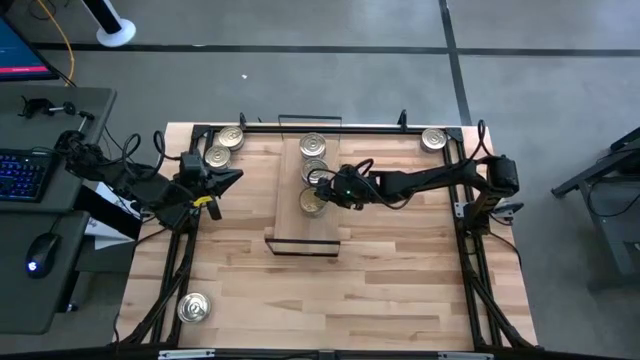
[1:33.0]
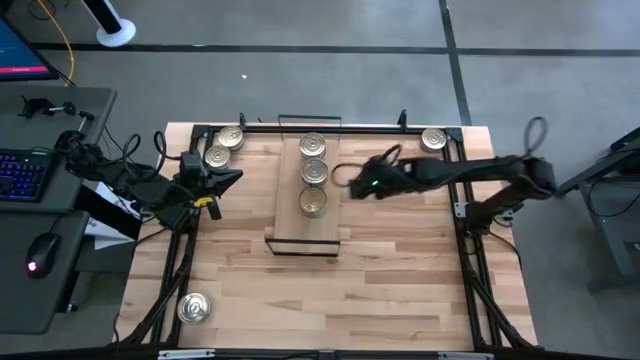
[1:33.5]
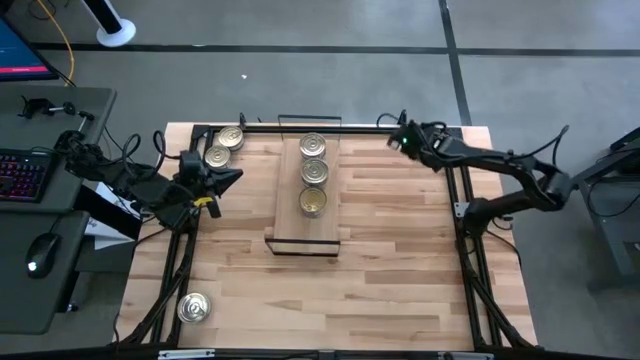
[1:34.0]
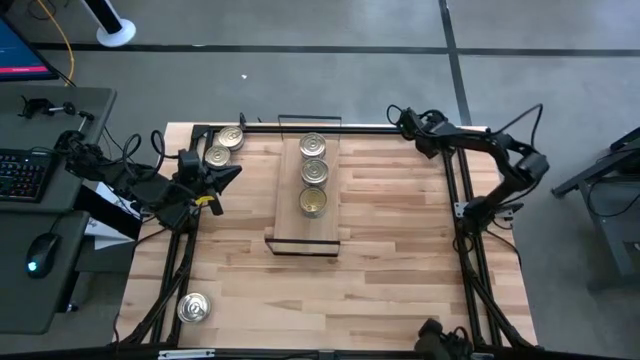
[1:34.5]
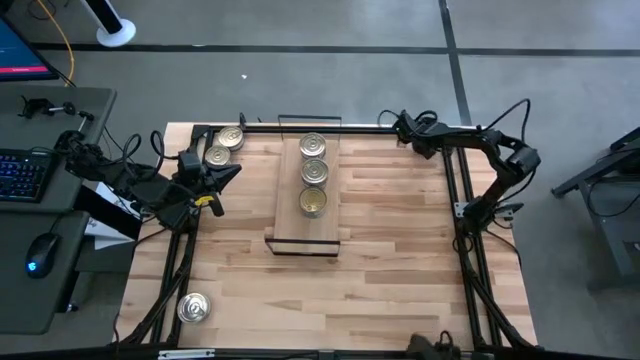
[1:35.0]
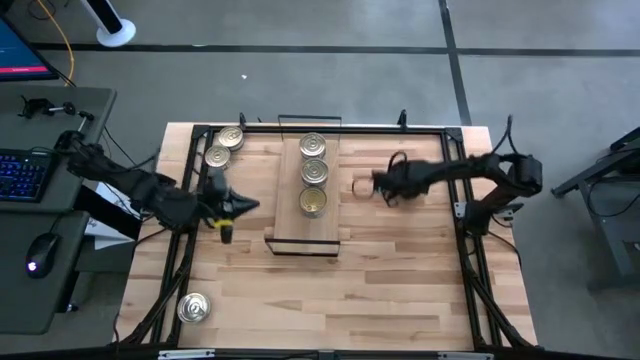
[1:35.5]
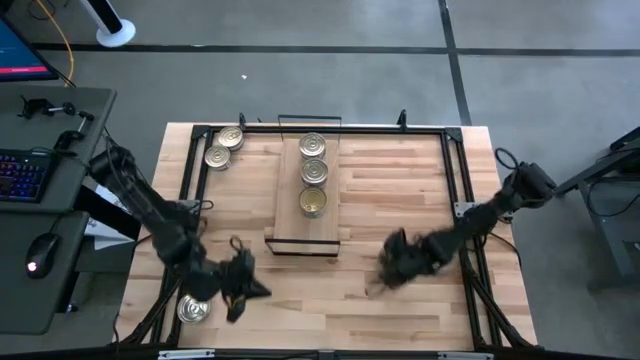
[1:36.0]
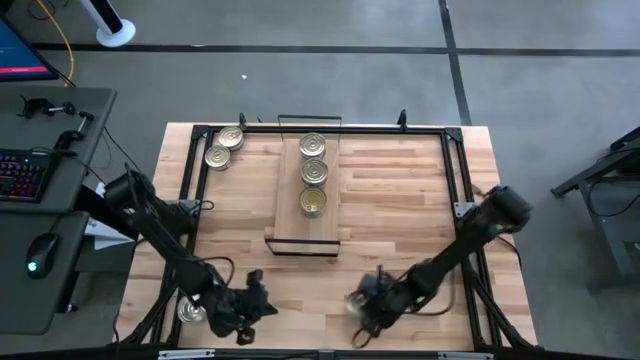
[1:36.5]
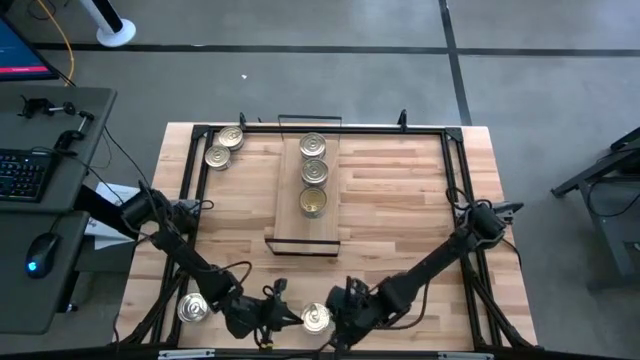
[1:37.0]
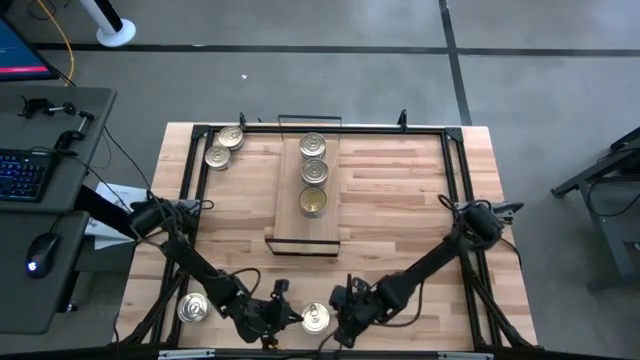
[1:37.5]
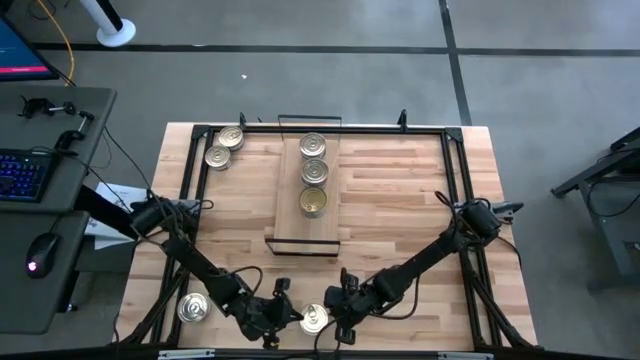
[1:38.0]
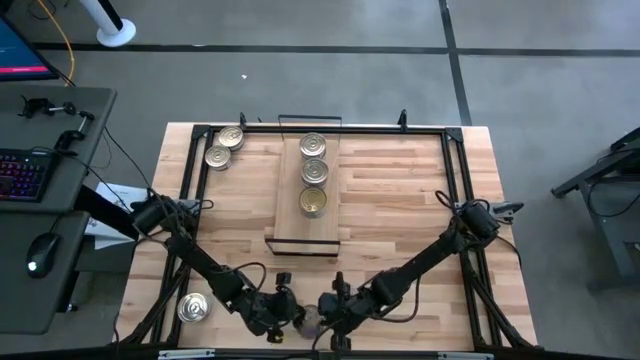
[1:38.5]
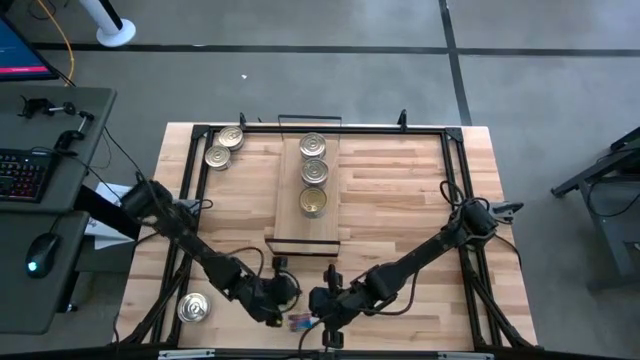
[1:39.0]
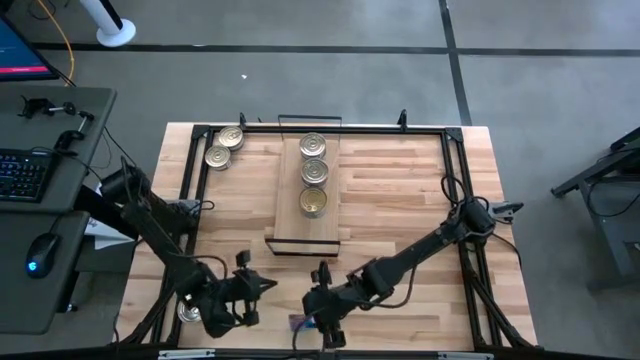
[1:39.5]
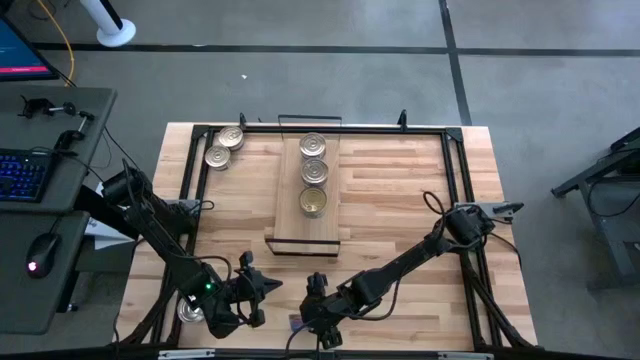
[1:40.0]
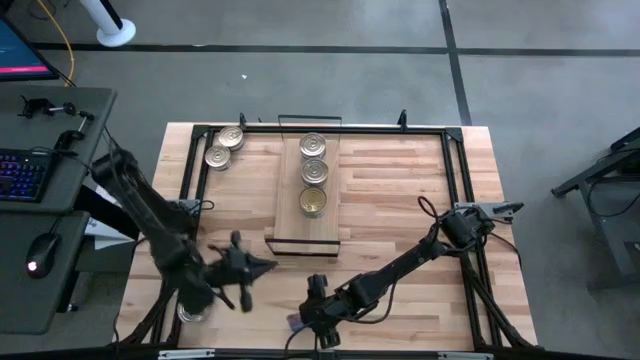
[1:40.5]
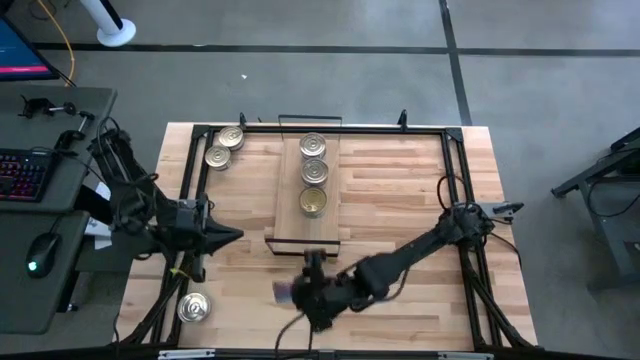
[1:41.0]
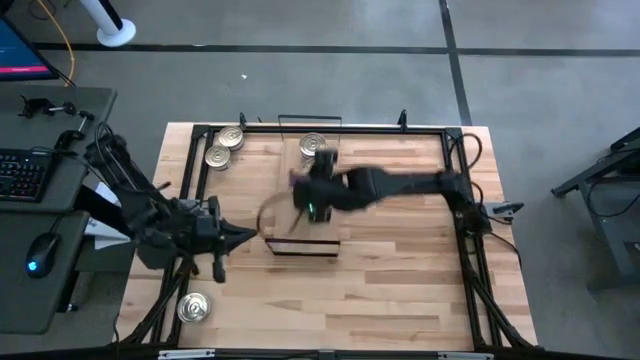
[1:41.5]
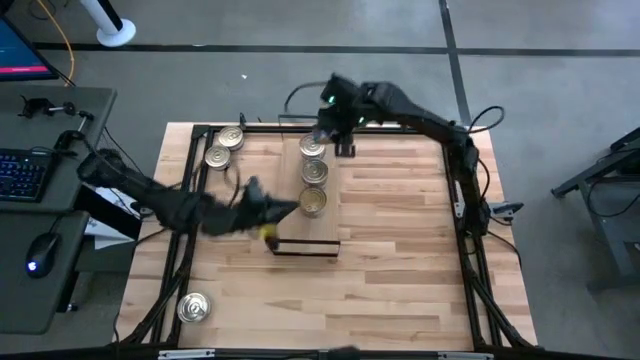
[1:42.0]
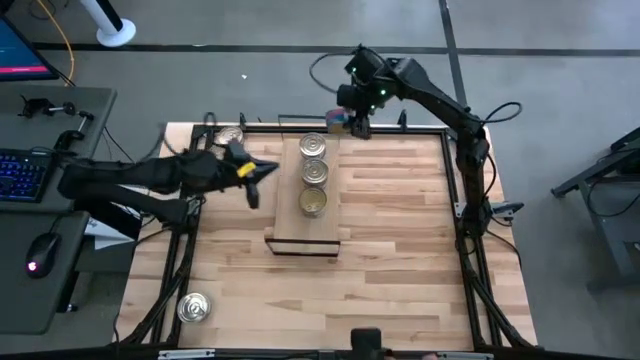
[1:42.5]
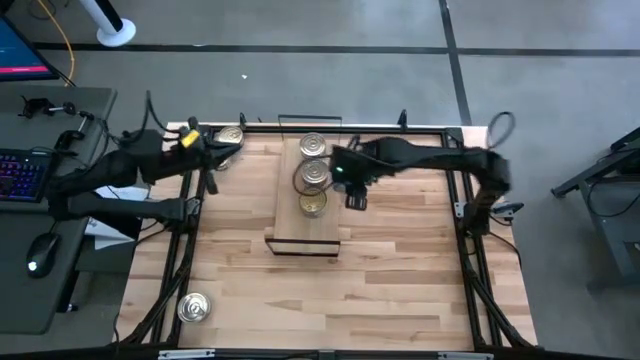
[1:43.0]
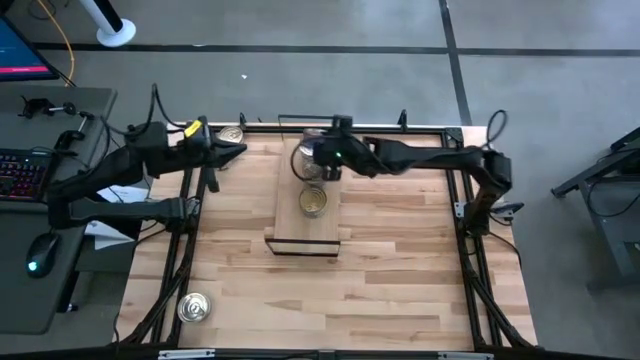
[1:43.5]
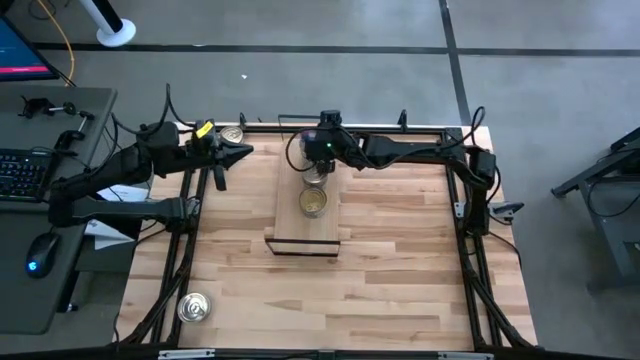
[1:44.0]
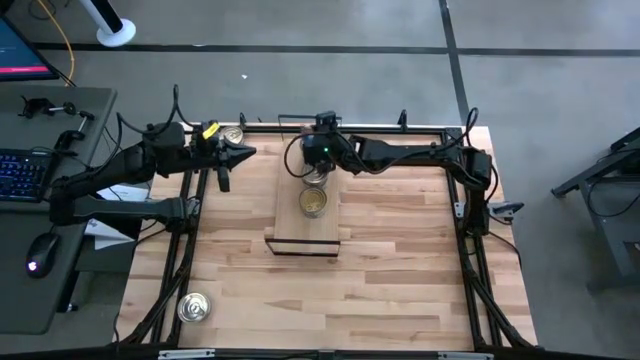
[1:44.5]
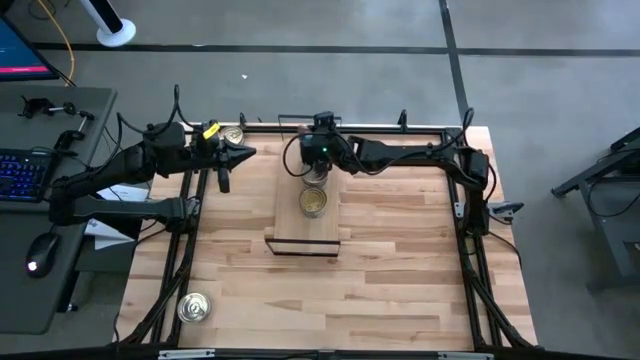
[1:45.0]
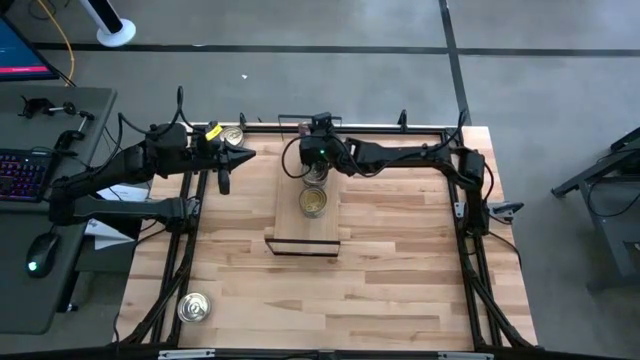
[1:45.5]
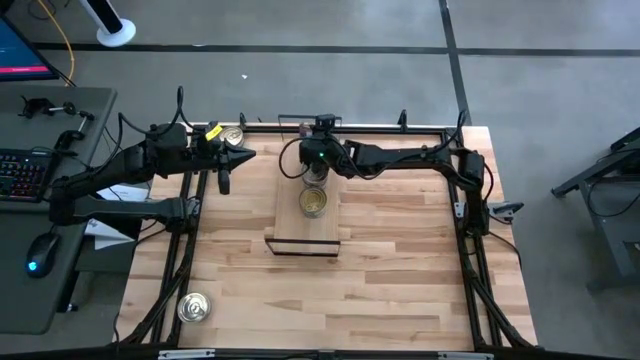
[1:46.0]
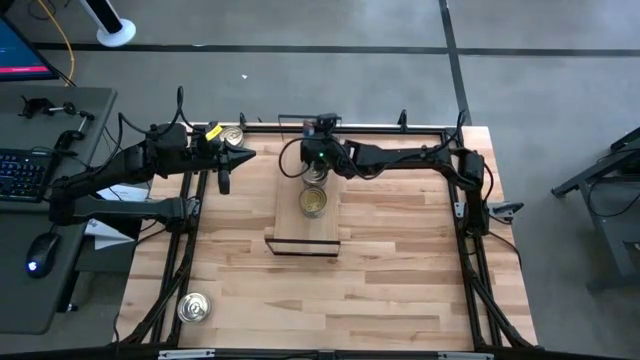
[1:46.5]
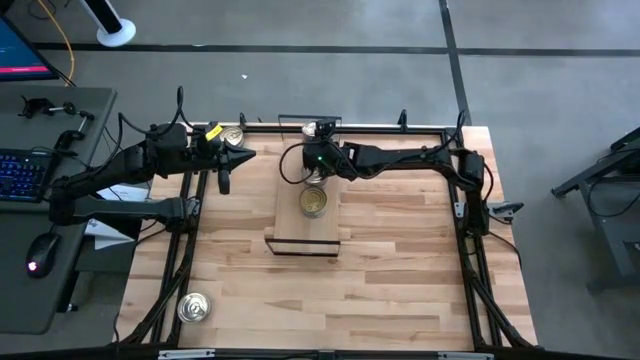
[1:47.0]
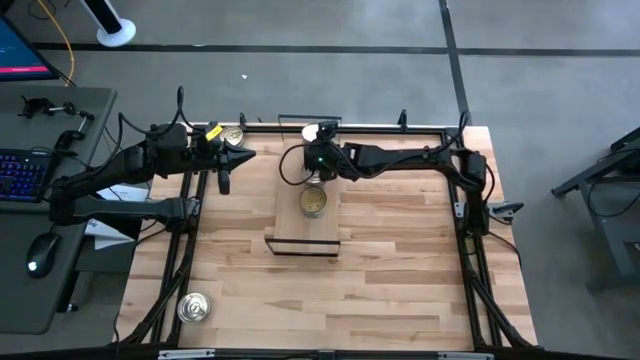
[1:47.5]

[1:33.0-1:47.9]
Task: Stack canned seafood by type on shelf
Stack the blue pink tuna can on top of the other blue pink tuna cans on the shelf

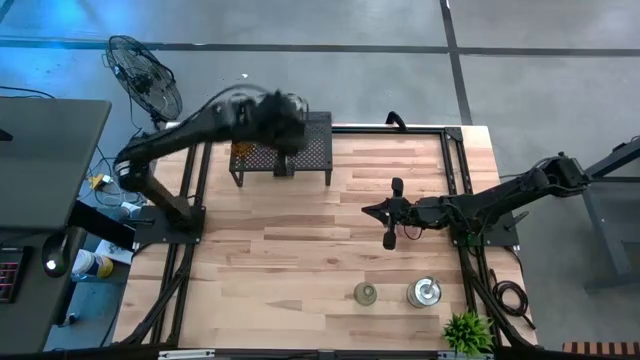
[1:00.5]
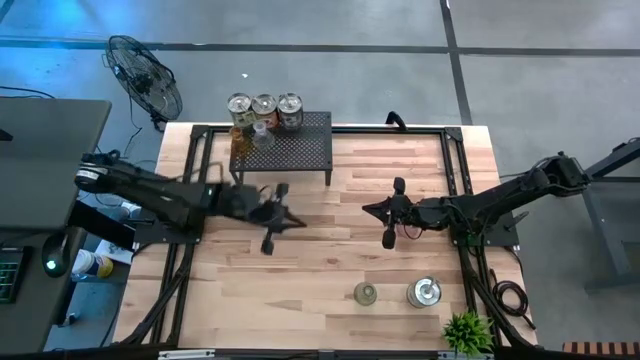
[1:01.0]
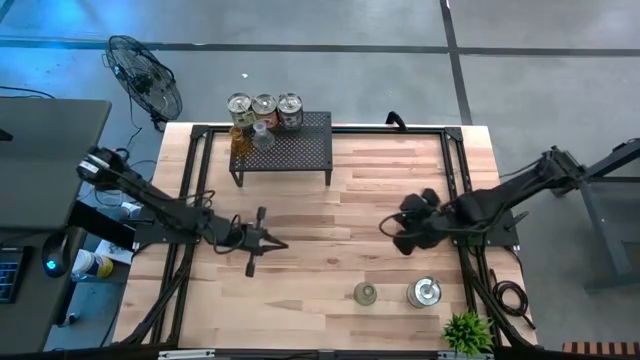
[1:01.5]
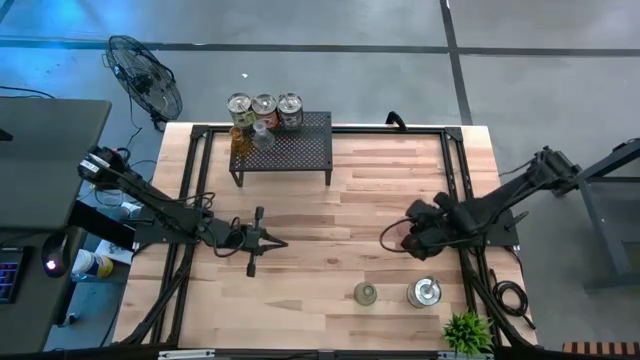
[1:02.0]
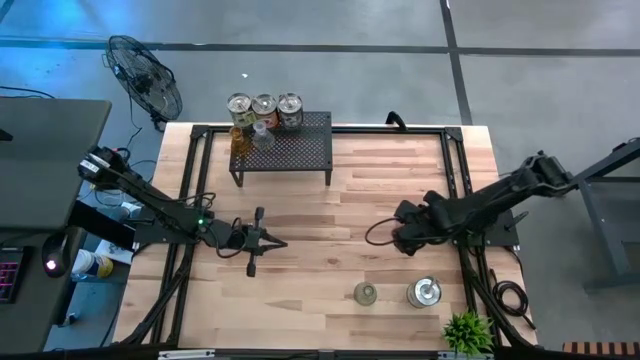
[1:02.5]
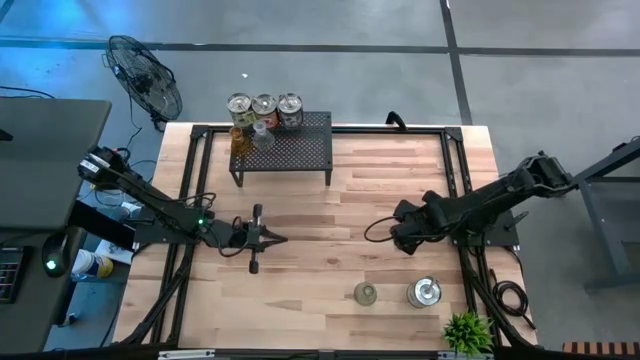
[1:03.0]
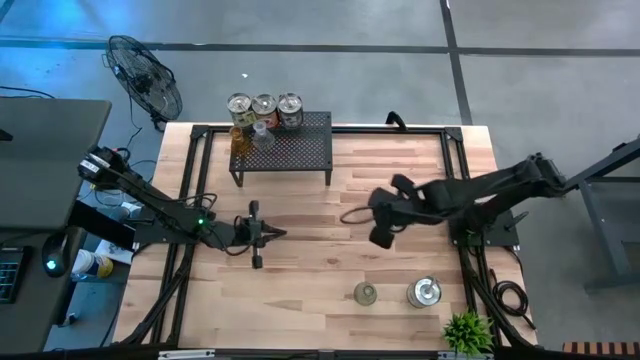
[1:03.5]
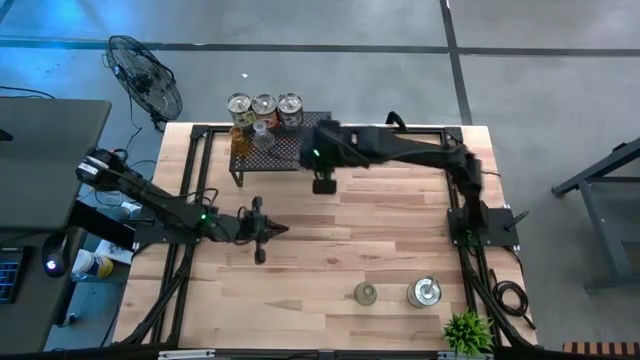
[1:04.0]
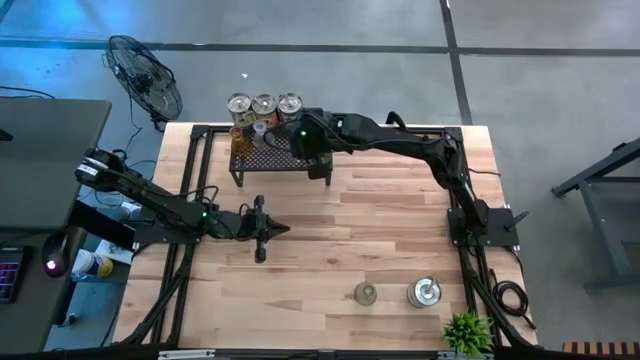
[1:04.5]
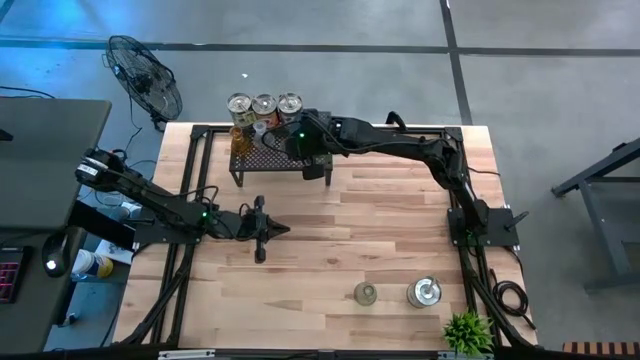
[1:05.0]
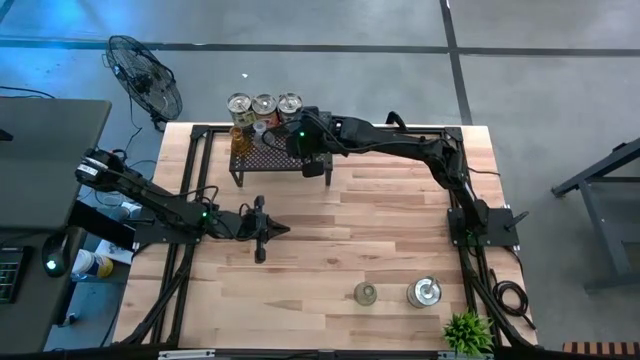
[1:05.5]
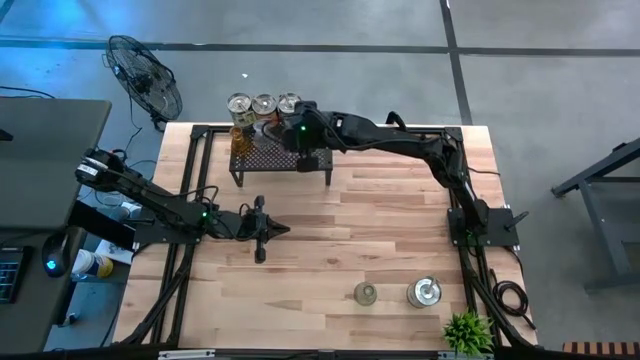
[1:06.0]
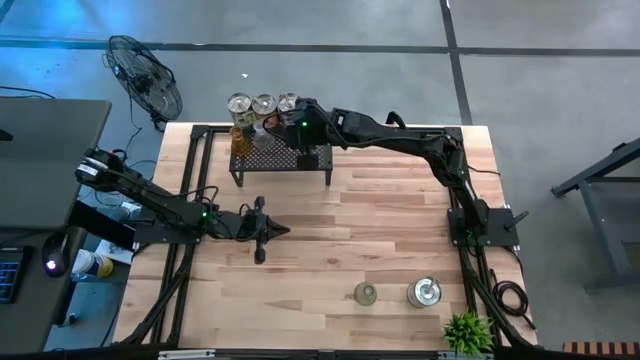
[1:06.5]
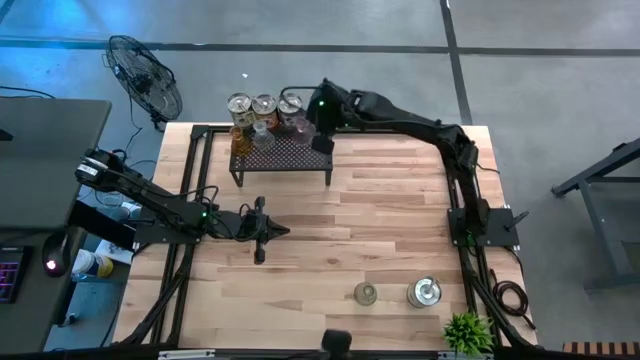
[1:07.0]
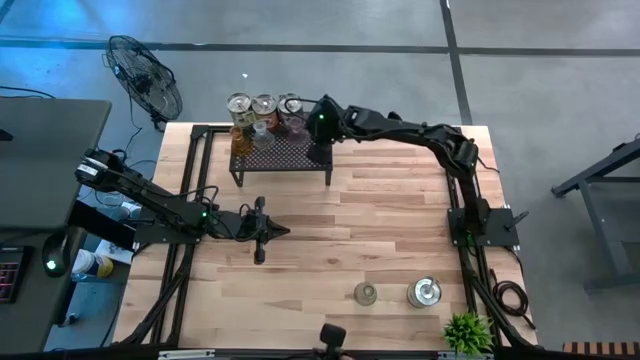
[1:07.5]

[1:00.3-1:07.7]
Task: Pick & Place candle stick holders
Put the pink candle holder on the shelf aligned with the red scented candle
